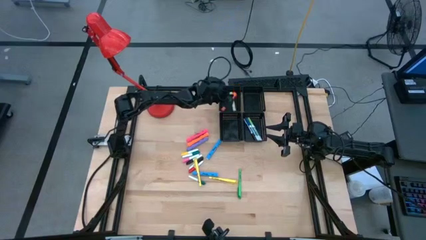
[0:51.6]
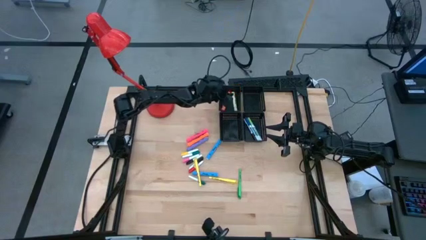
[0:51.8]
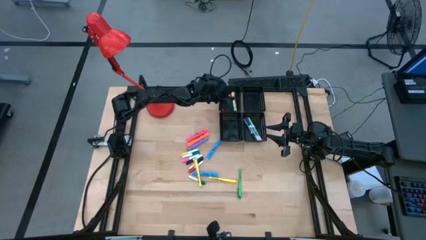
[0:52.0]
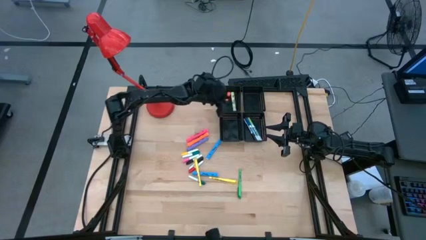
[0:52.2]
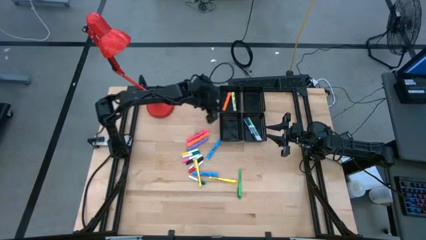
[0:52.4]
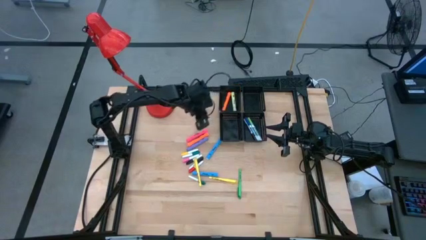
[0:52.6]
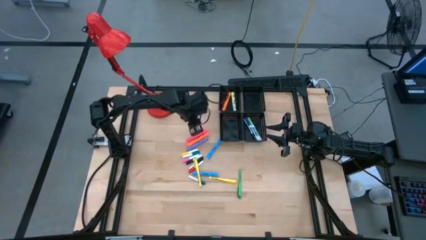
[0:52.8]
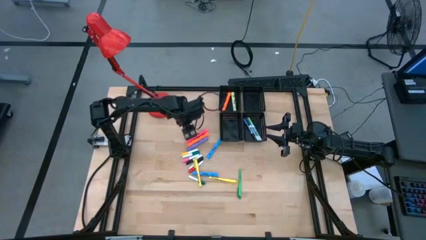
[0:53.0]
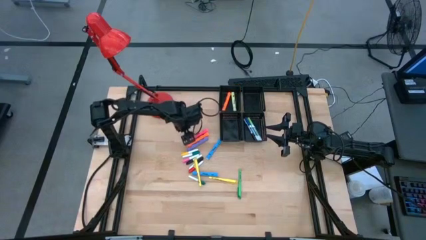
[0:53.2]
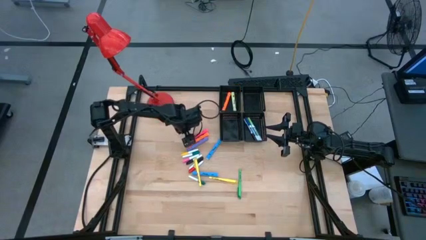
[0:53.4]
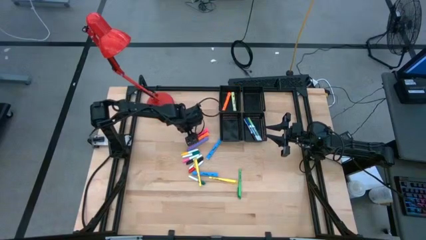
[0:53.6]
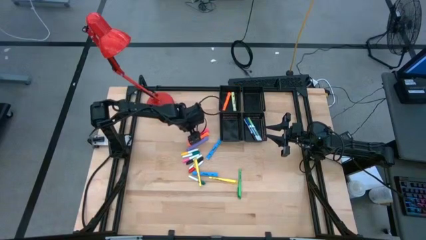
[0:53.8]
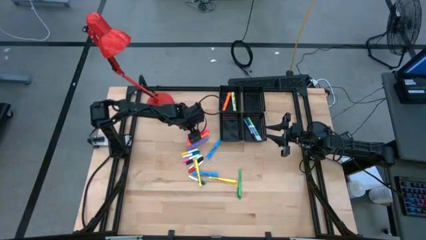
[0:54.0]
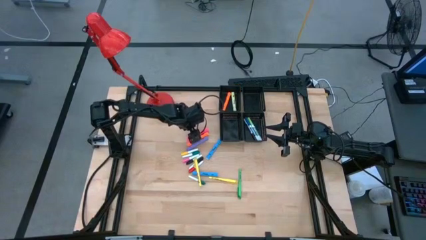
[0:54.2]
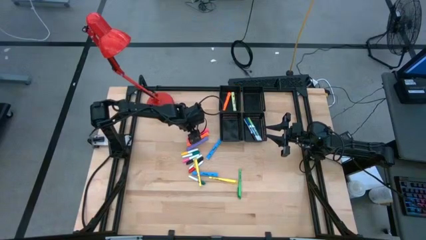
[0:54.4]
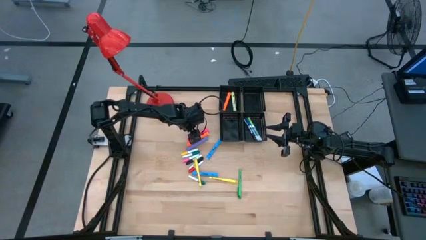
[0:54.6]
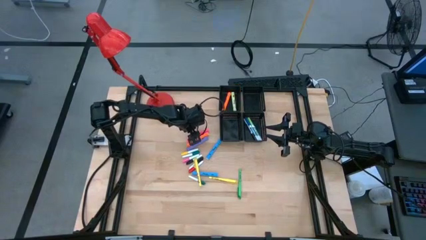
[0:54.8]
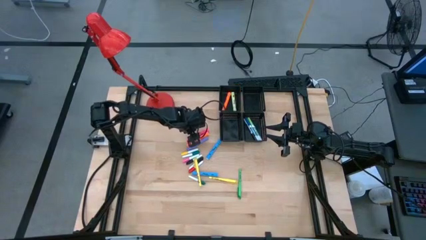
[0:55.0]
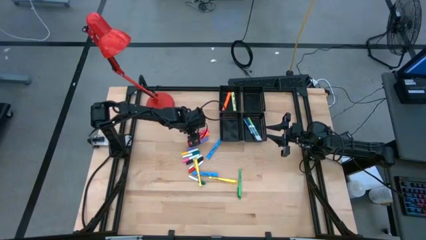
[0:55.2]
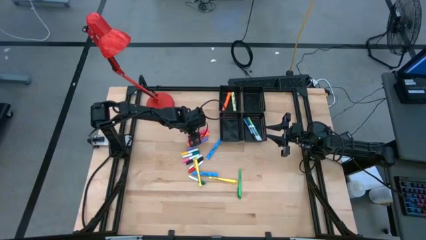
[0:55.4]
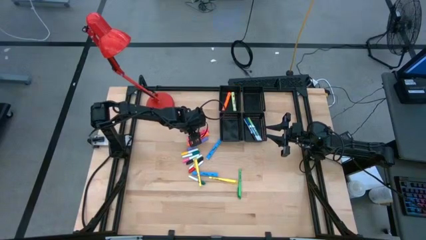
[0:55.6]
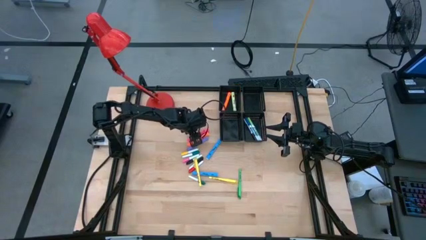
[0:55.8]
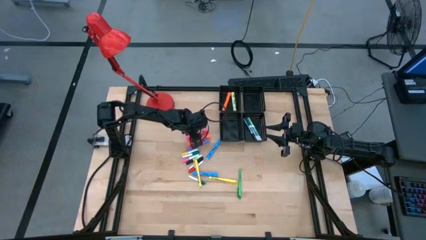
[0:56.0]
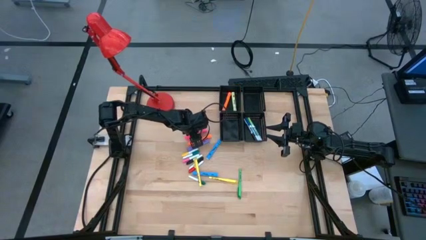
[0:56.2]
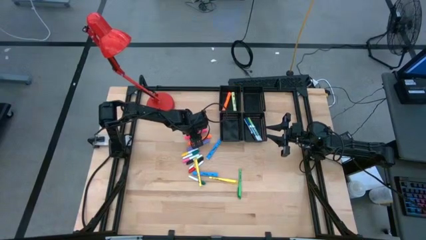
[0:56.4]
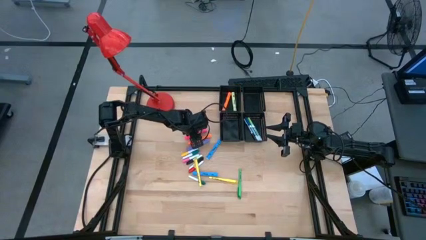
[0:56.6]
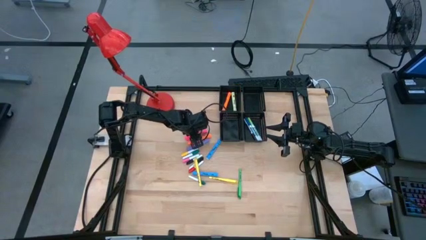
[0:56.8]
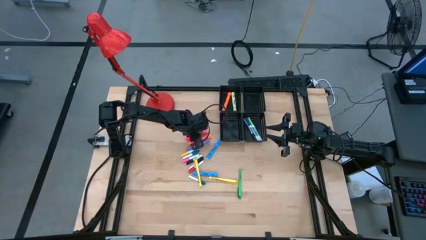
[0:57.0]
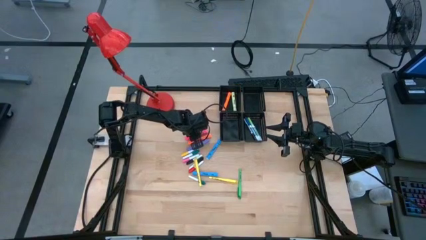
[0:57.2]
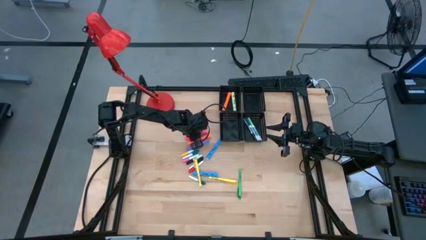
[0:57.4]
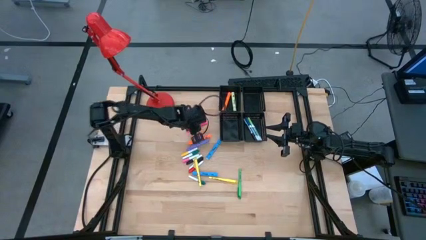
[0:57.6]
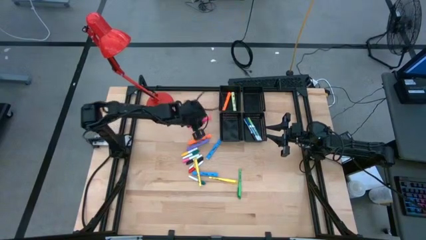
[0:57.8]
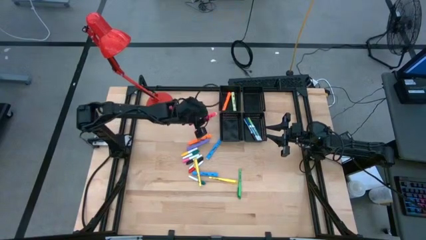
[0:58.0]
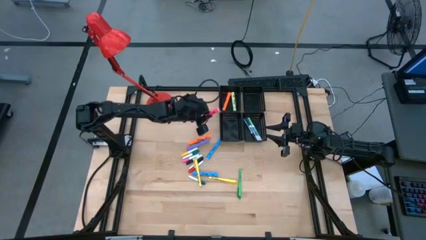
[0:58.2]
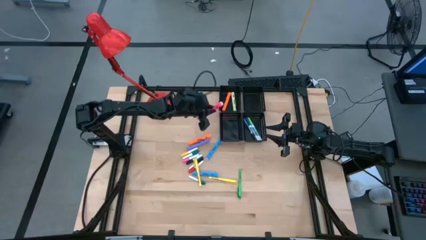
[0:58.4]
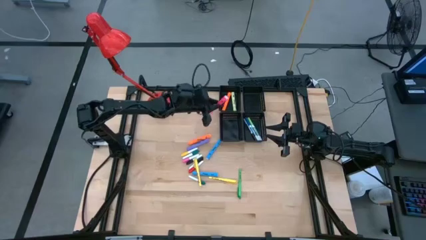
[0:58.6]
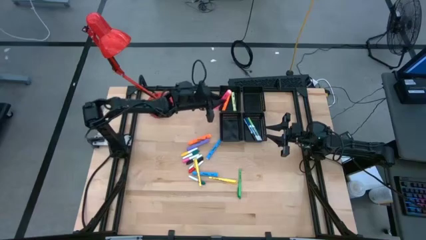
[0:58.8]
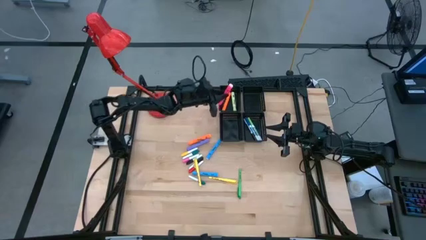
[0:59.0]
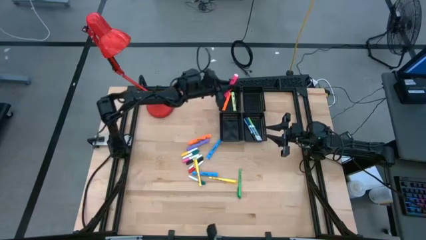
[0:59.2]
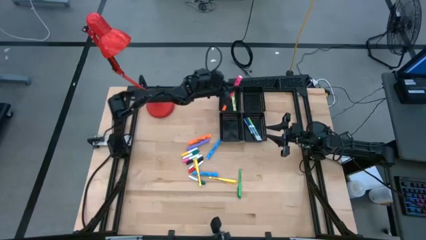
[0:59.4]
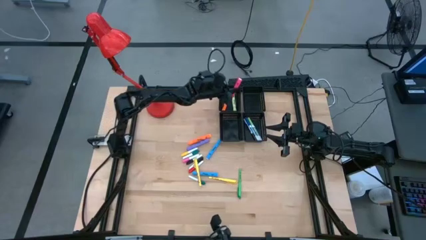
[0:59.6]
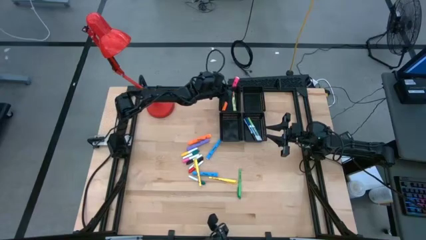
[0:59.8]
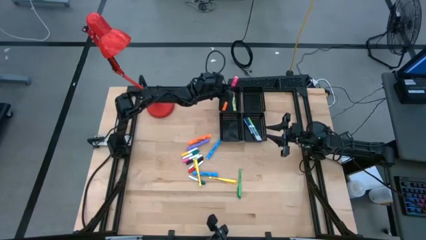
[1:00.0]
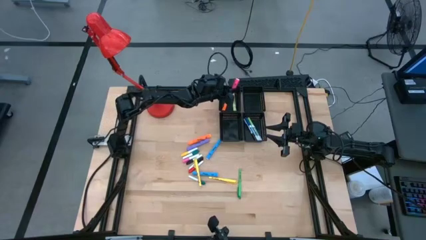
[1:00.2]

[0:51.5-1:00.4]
Task: Pick & Place Markers
Put the pink highlighter pen into the top left black bin

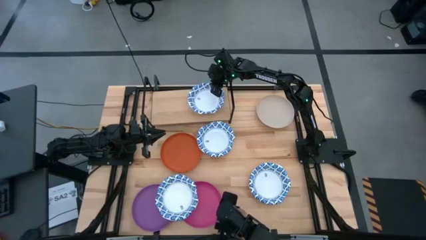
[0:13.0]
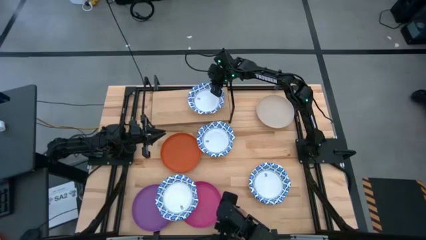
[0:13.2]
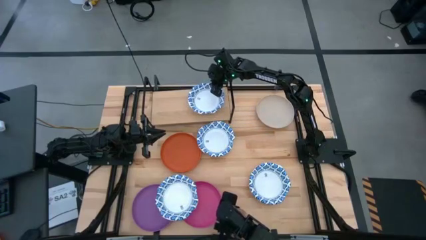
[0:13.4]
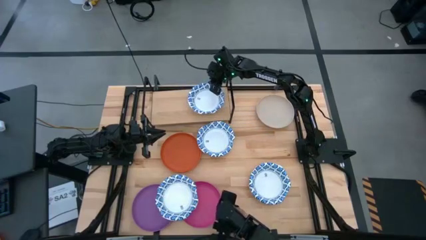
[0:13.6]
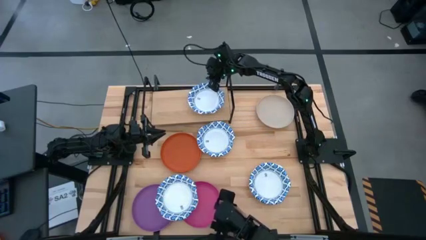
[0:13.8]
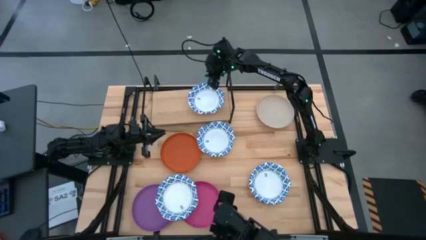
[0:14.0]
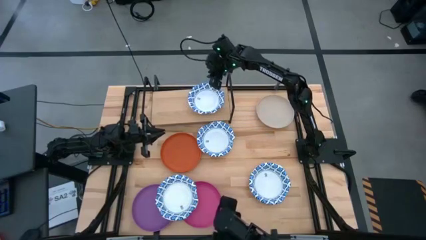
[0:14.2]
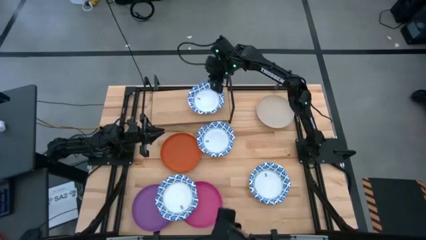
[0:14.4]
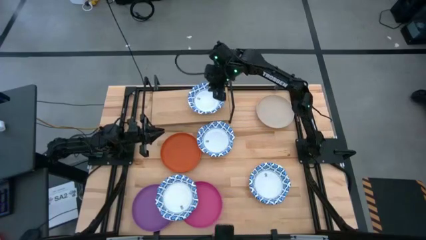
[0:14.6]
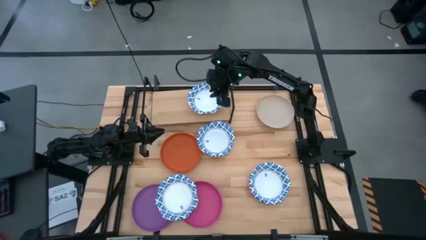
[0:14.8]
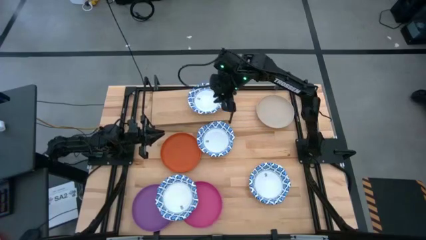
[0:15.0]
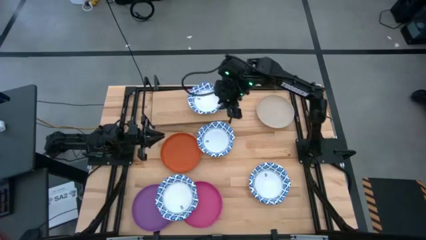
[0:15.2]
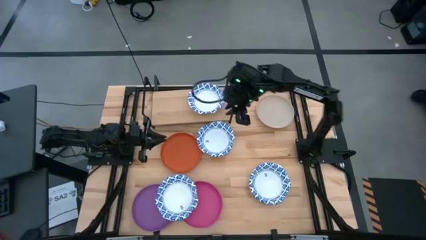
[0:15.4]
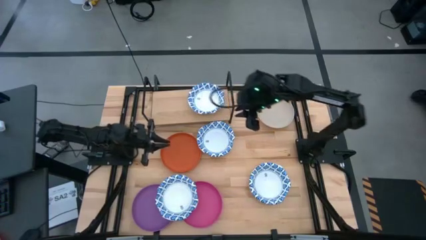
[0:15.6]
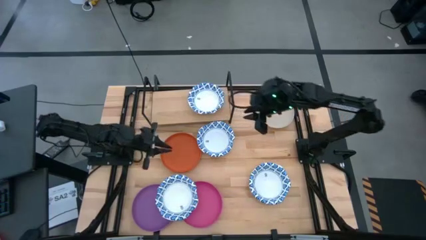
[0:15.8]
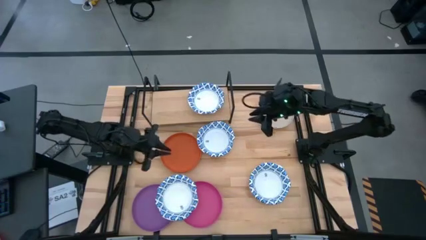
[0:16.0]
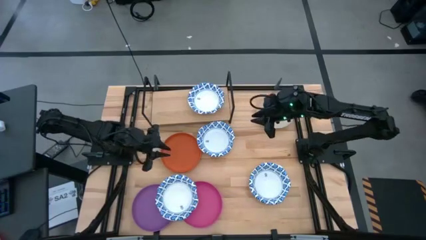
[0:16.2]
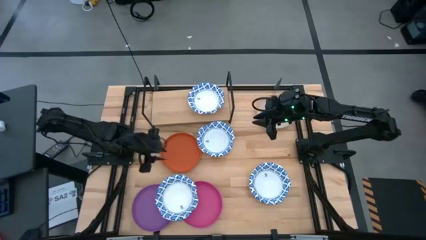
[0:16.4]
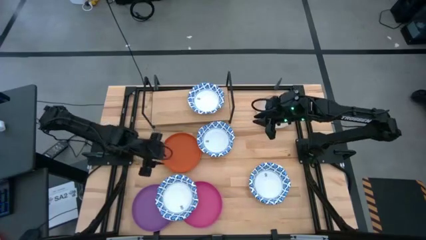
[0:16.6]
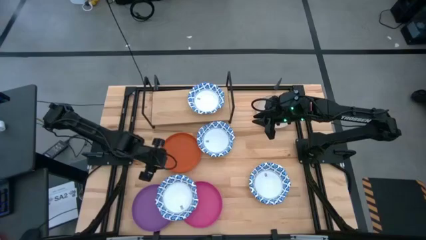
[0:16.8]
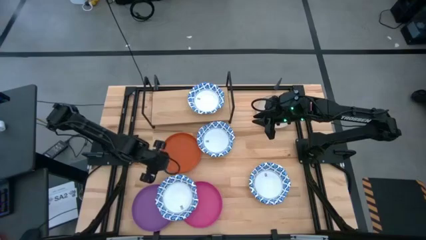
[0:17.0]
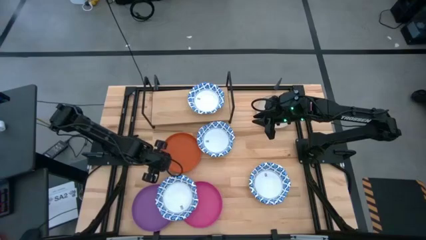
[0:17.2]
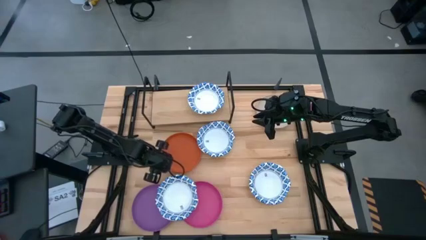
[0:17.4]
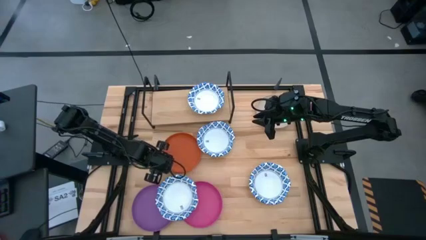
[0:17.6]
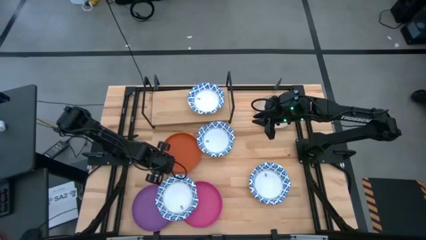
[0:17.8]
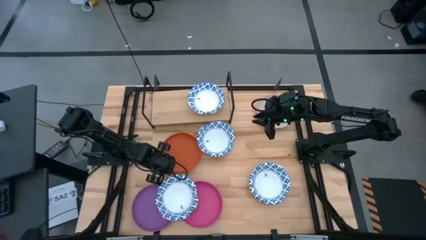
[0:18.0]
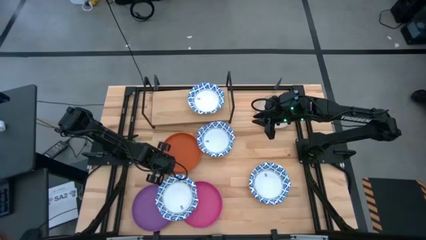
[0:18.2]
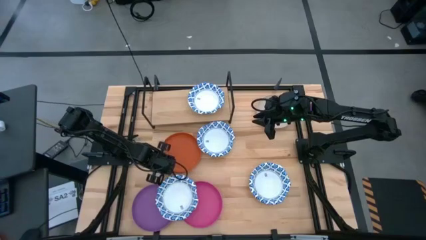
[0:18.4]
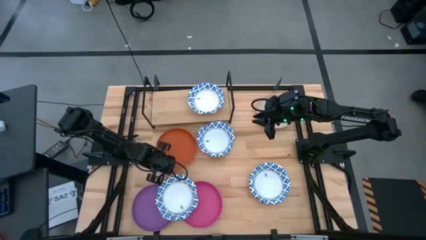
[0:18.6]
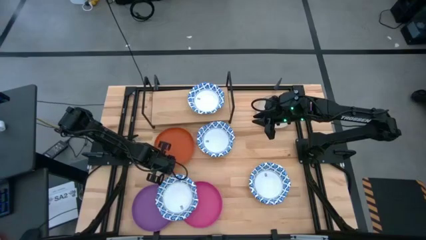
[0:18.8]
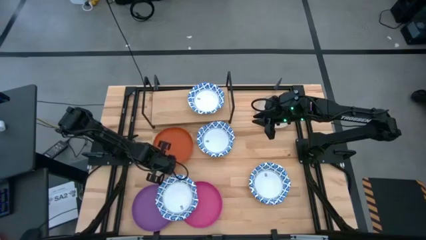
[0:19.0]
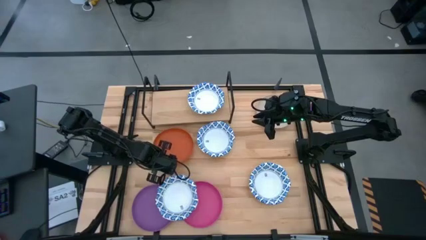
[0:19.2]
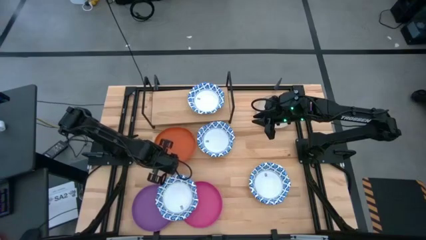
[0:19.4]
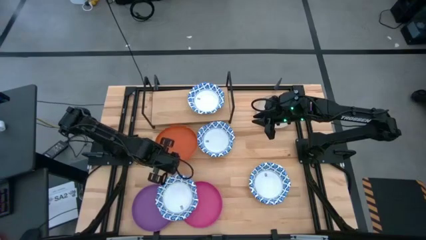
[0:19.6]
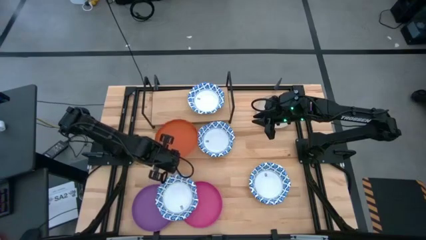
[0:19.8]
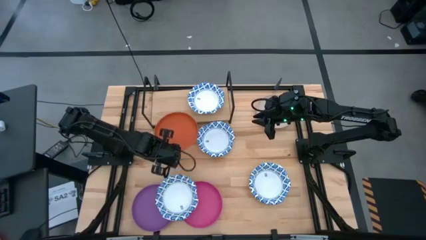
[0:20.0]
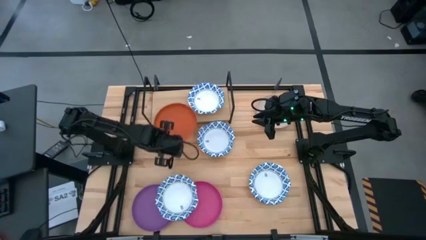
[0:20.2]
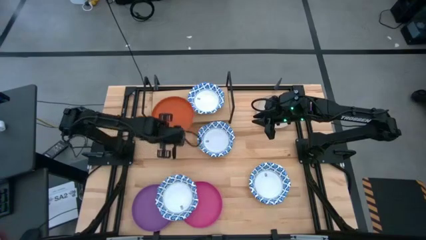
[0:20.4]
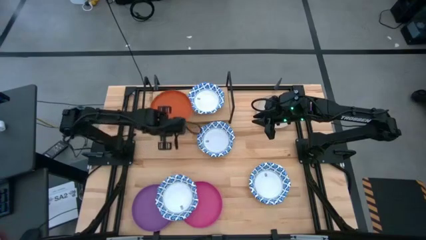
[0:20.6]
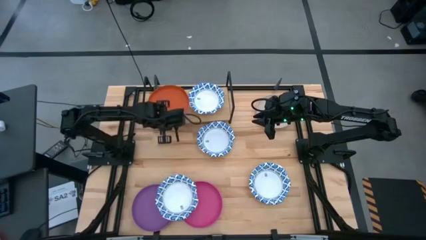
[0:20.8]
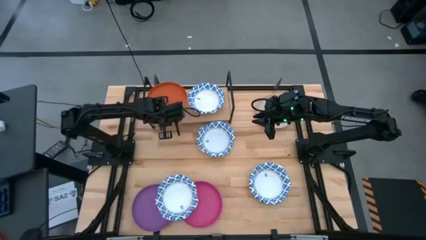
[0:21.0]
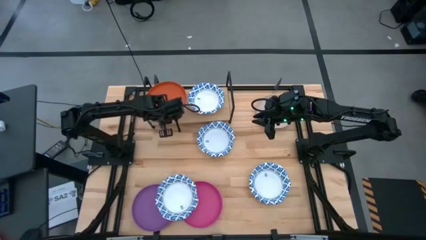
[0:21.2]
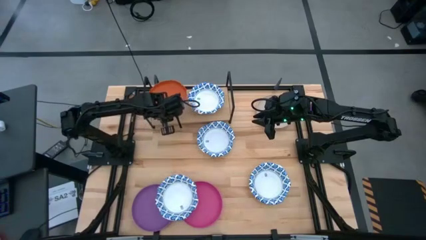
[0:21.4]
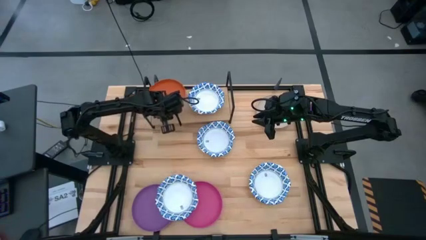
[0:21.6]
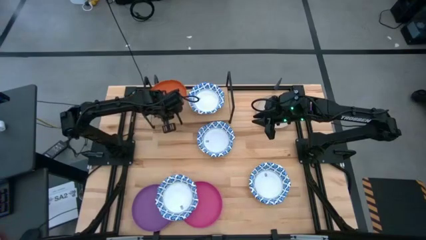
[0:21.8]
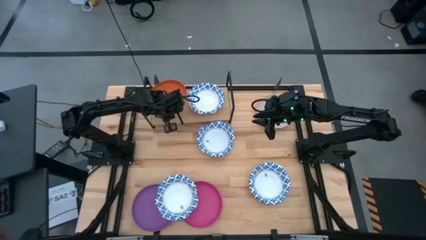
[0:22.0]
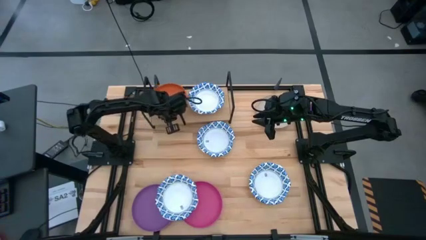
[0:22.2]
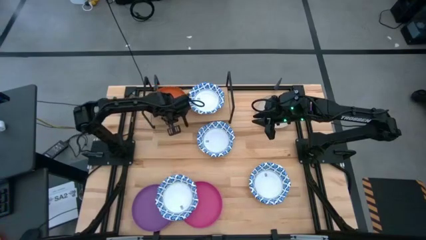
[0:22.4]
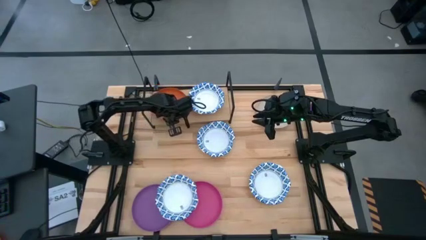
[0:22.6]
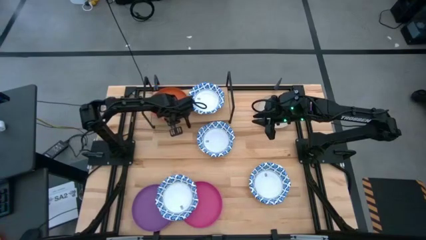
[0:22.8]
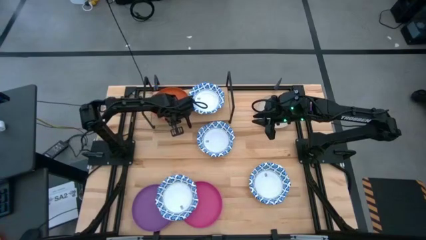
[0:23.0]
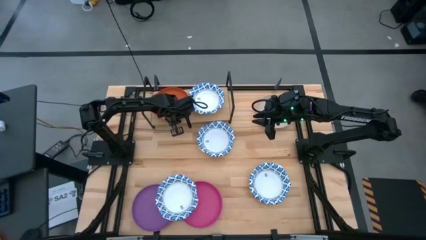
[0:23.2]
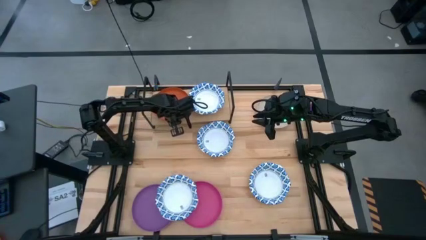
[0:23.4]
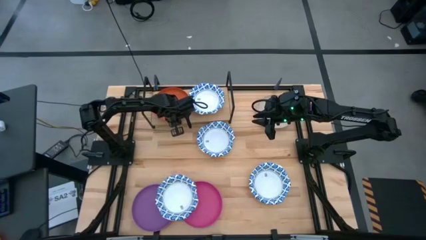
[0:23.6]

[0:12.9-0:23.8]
Task: Place and stack plates onto a shelf
Put the orange plate on the shelf
